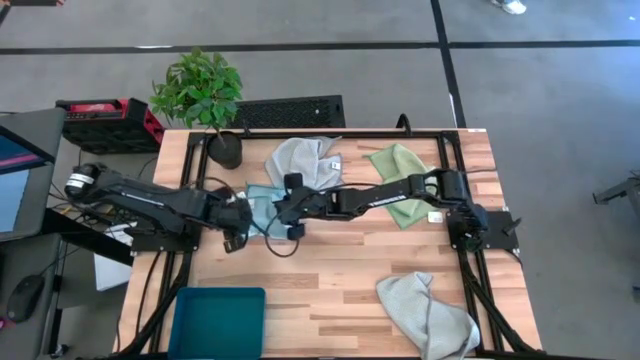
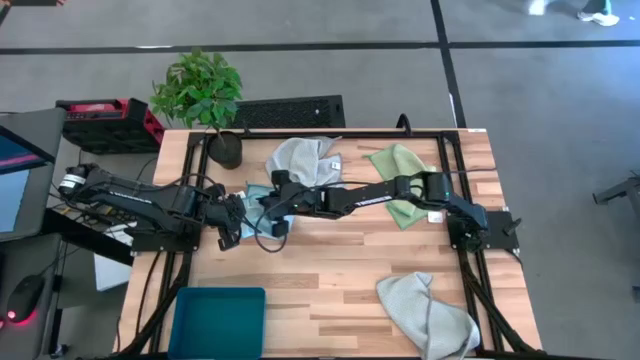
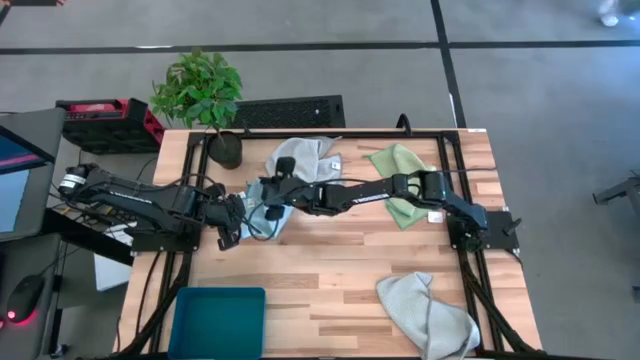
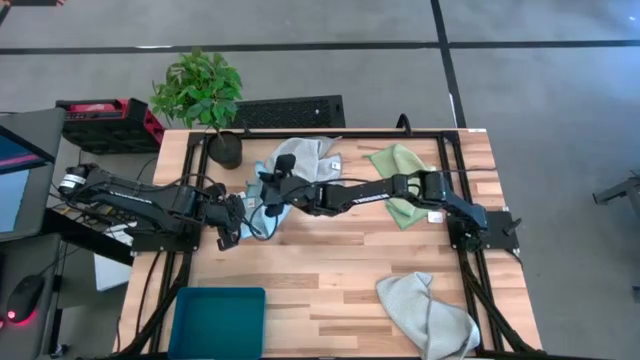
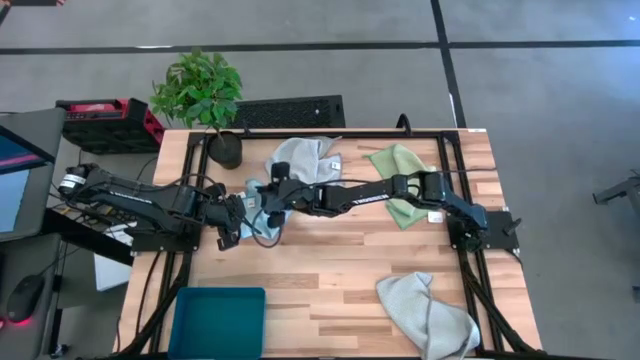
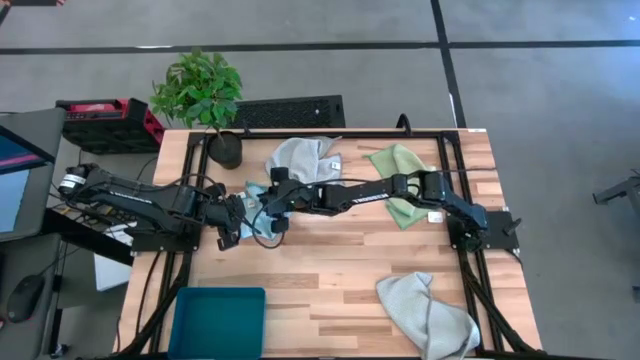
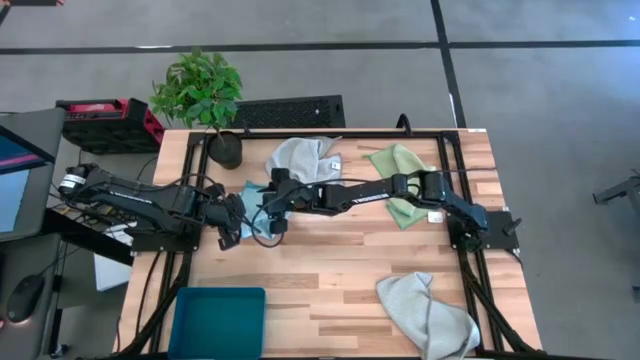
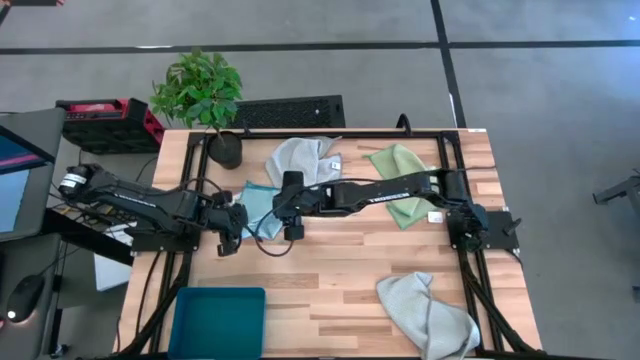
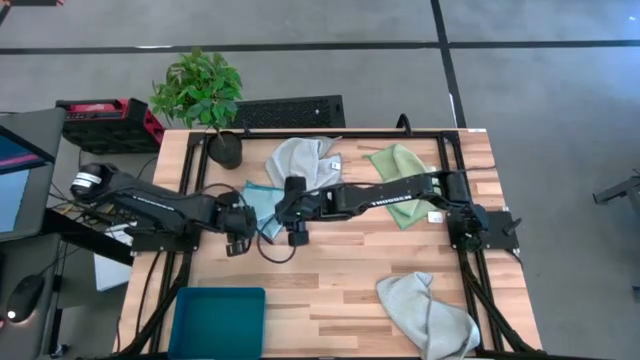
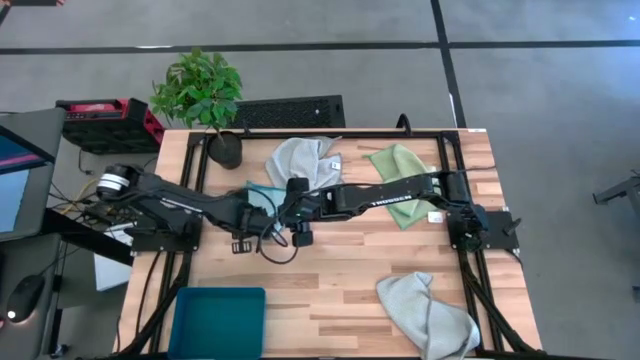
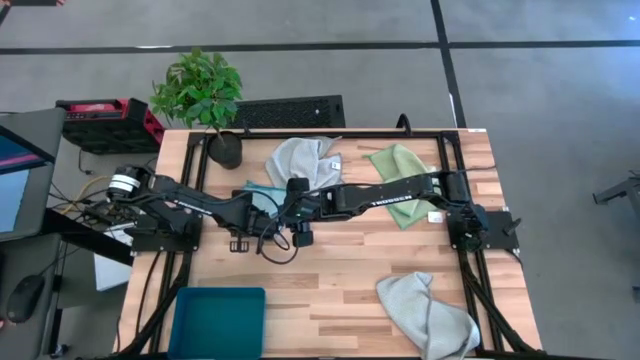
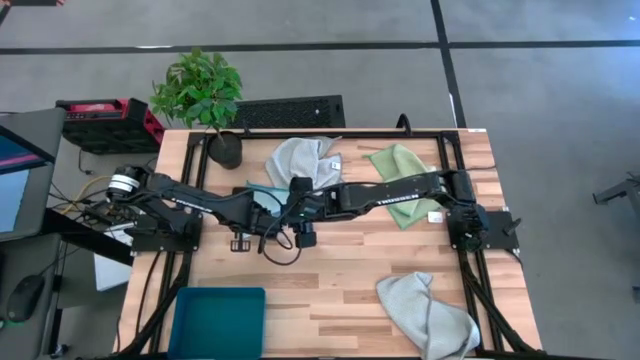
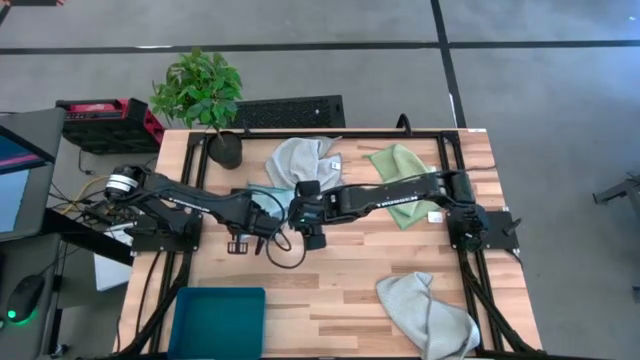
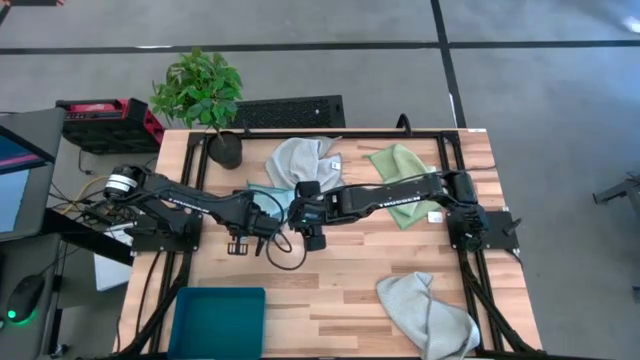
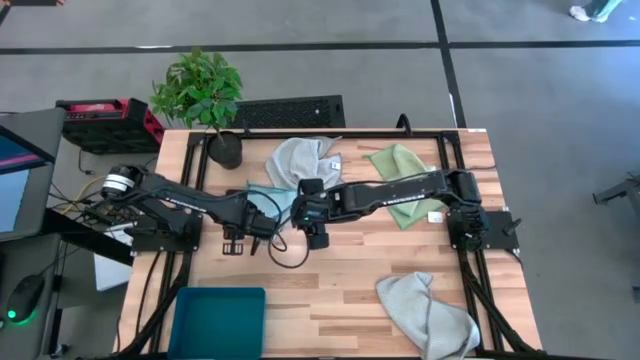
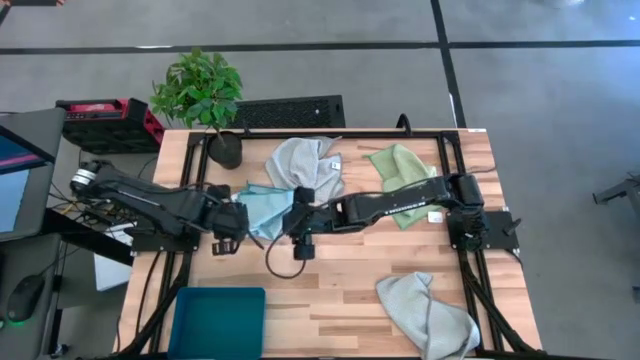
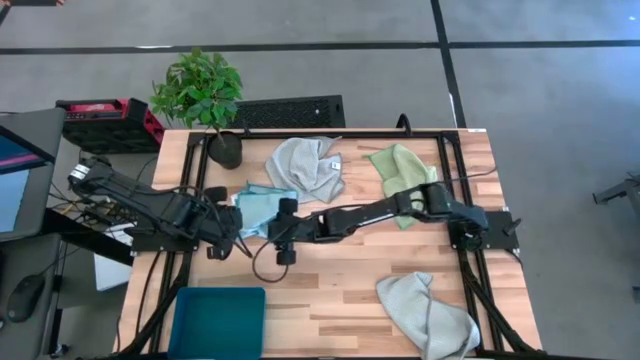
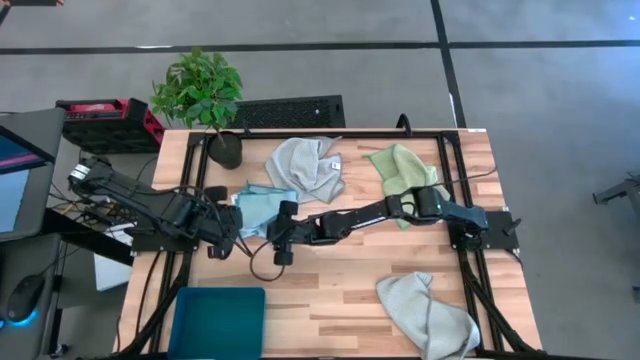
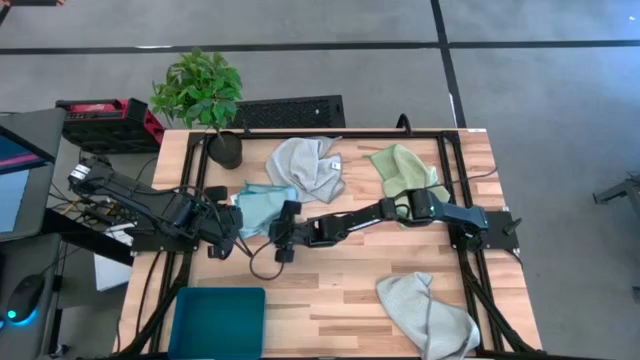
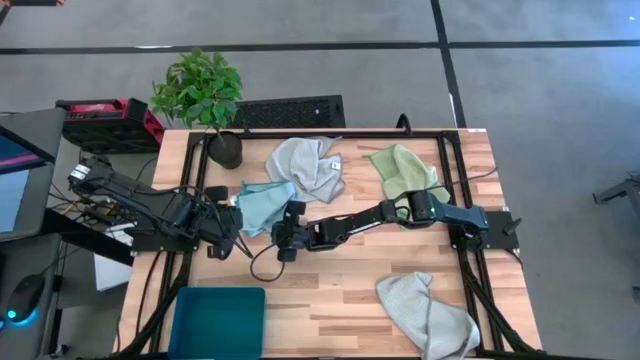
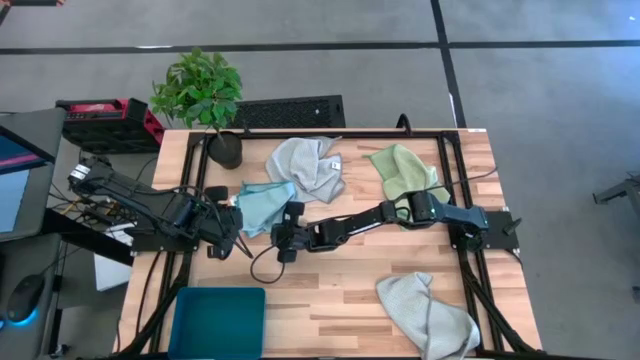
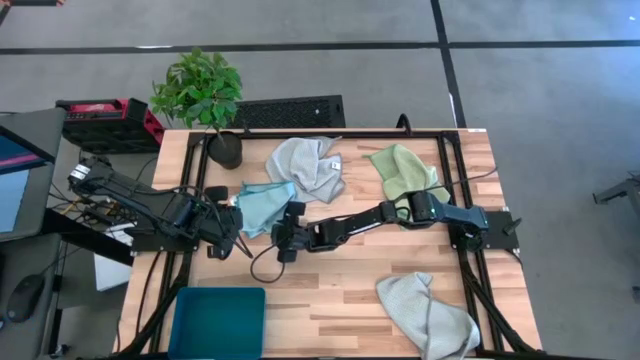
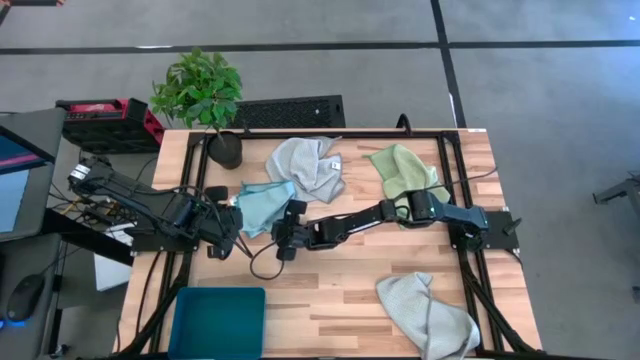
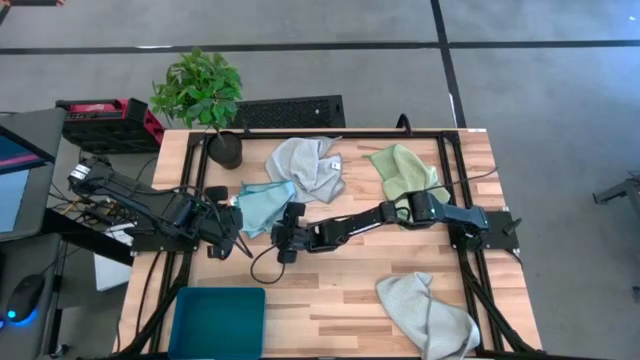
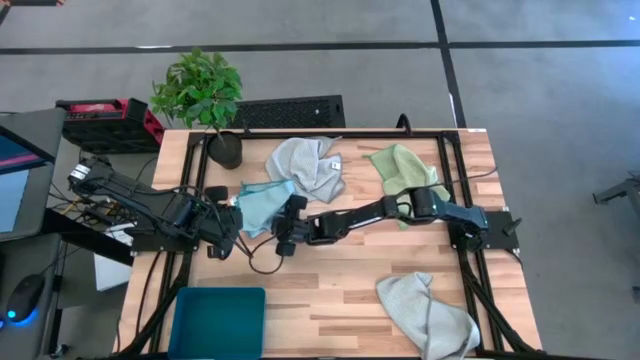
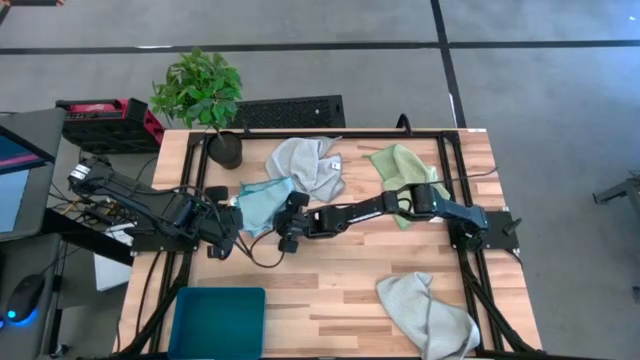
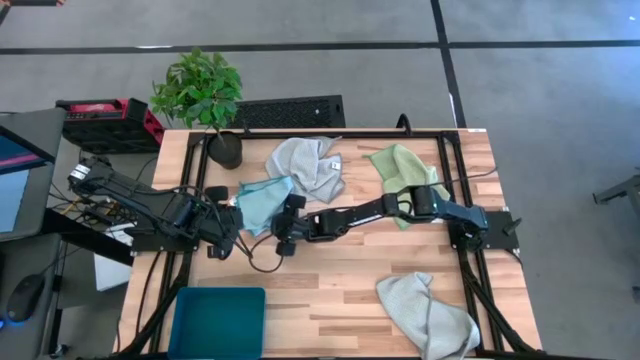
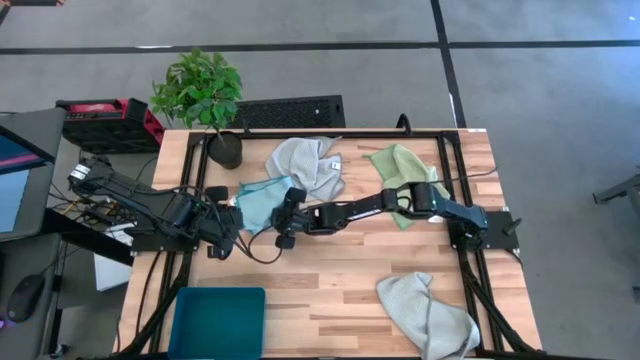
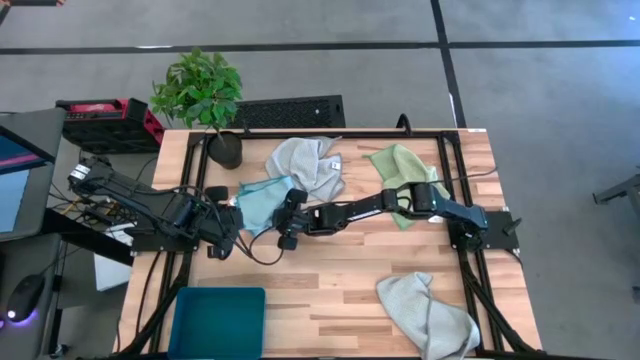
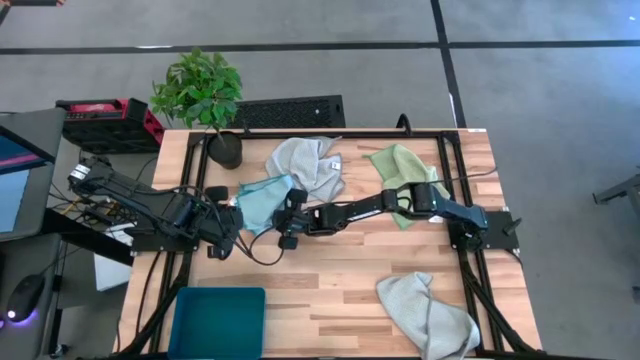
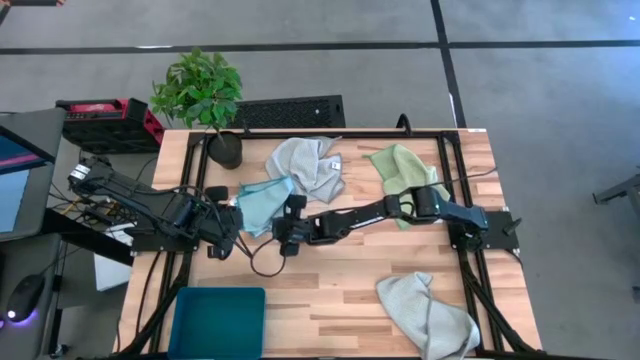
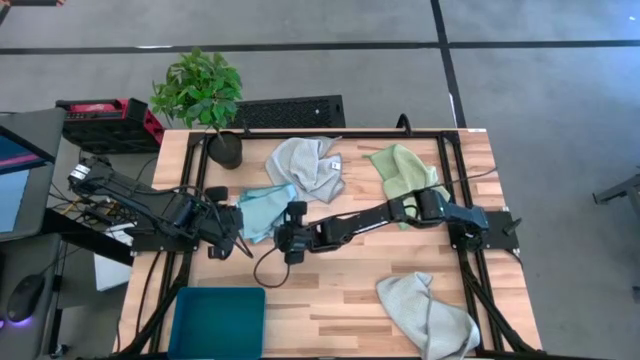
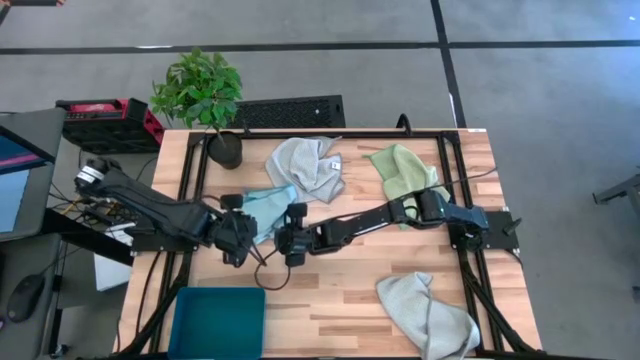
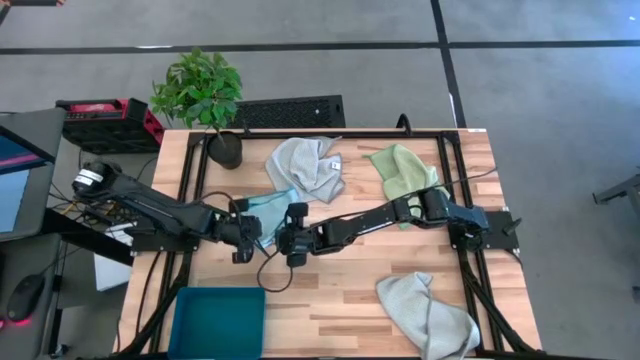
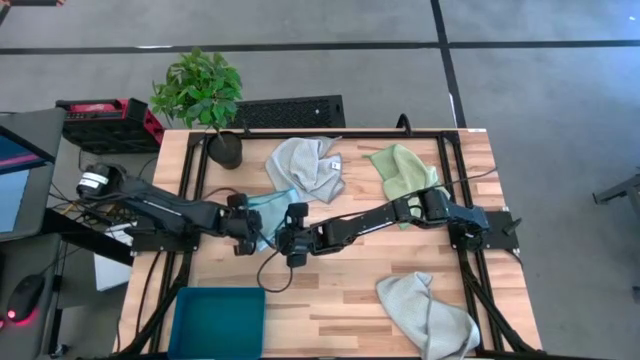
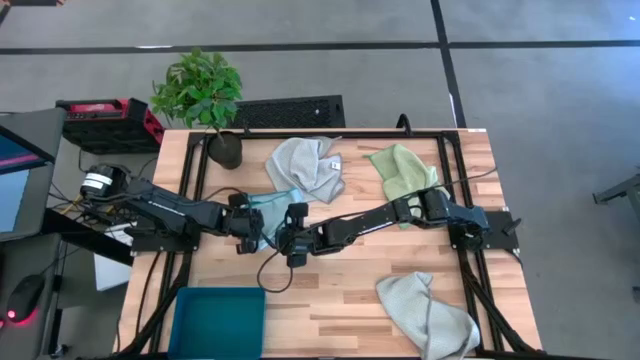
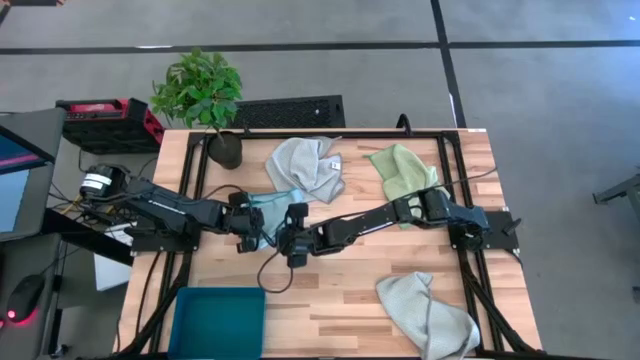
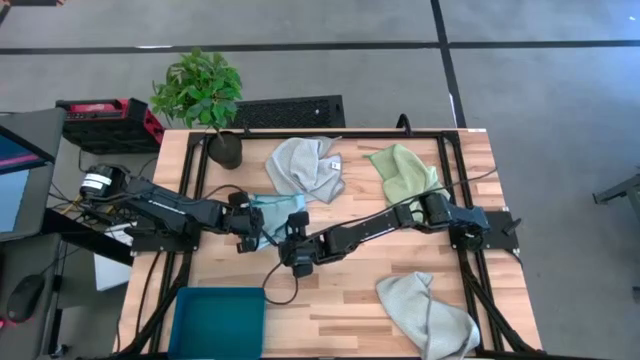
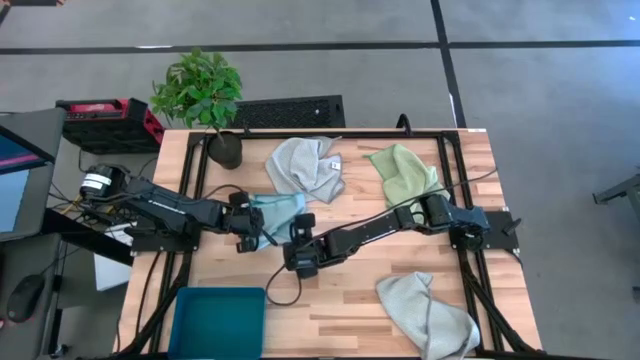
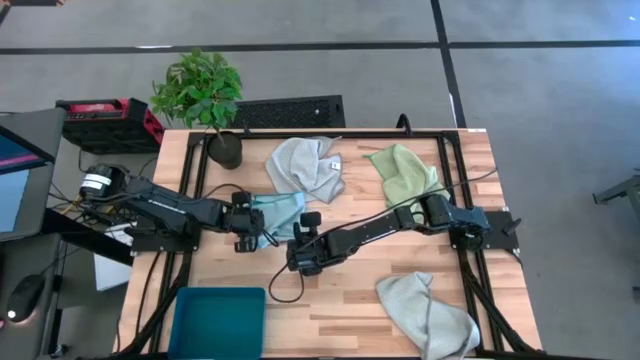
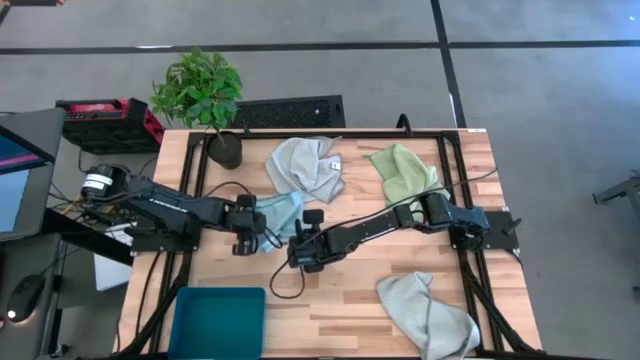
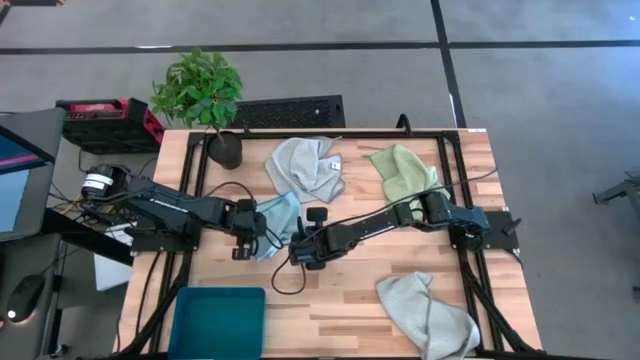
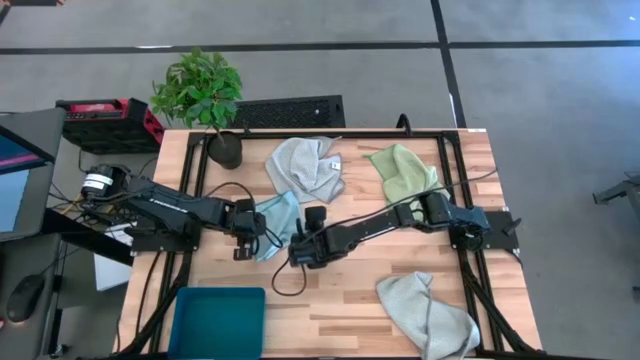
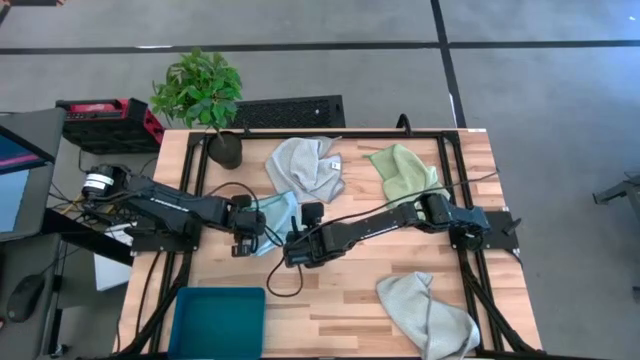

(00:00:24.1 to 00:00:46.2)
Task: Fold microfiber towels
Fold the blue microfiber cloth
